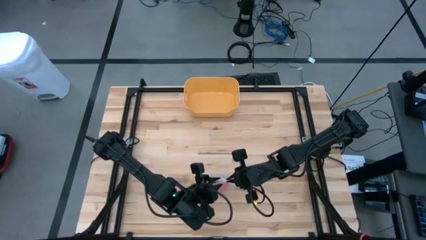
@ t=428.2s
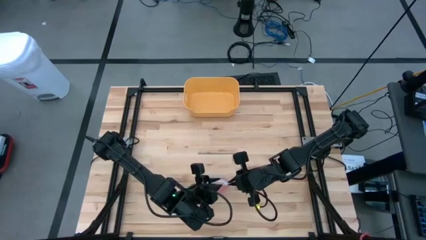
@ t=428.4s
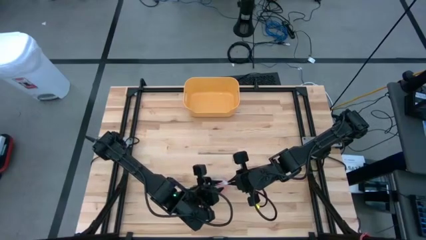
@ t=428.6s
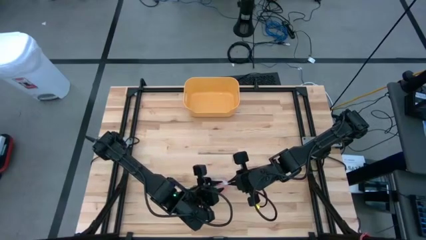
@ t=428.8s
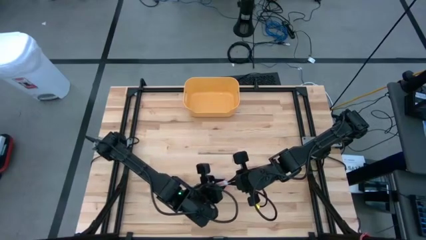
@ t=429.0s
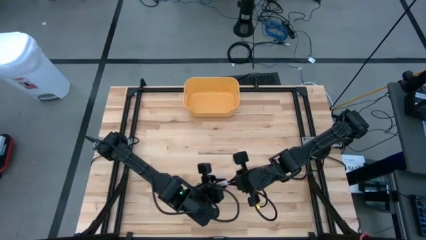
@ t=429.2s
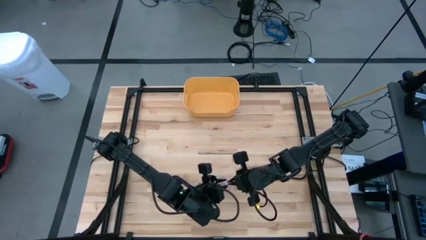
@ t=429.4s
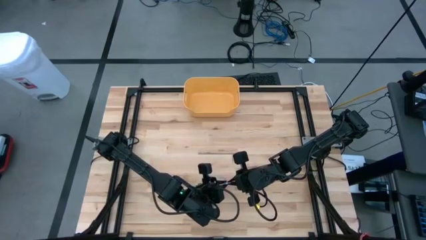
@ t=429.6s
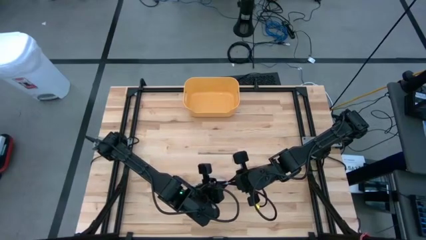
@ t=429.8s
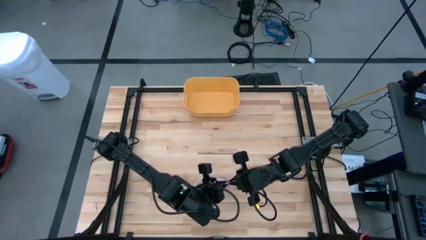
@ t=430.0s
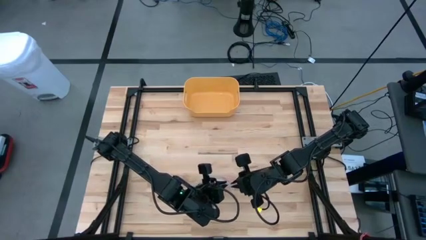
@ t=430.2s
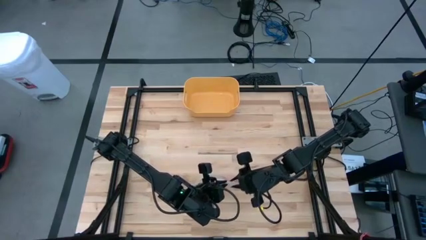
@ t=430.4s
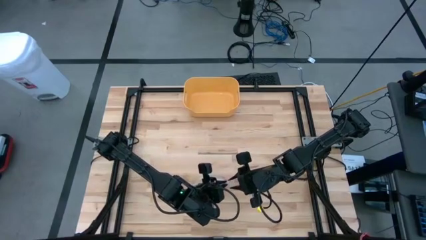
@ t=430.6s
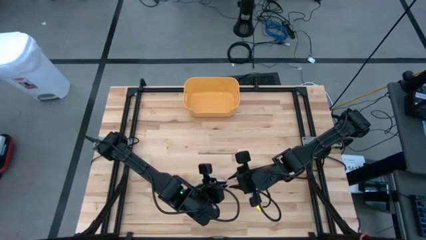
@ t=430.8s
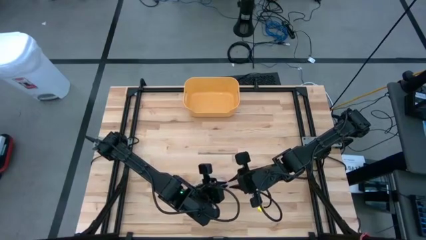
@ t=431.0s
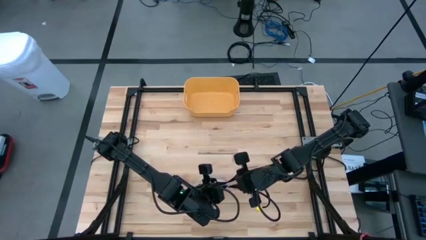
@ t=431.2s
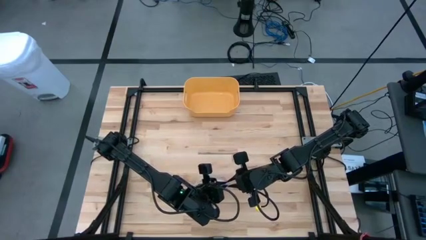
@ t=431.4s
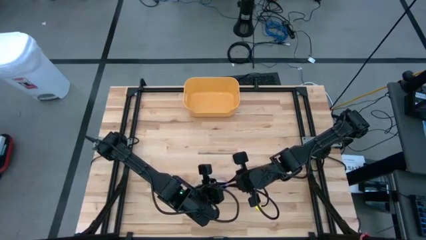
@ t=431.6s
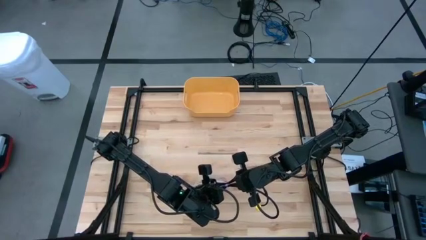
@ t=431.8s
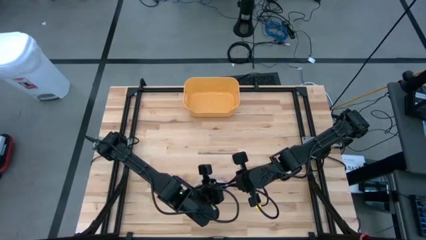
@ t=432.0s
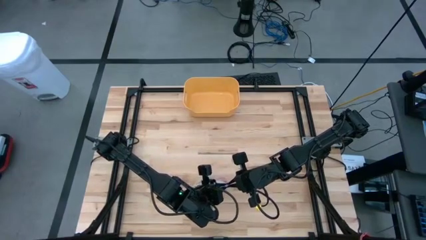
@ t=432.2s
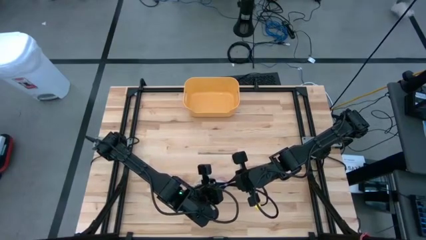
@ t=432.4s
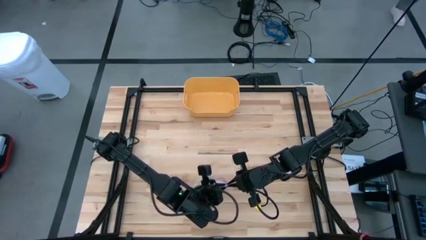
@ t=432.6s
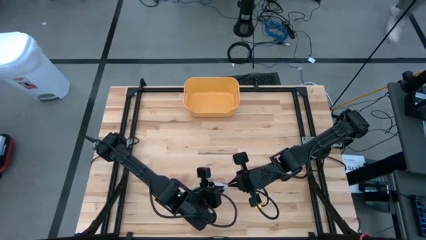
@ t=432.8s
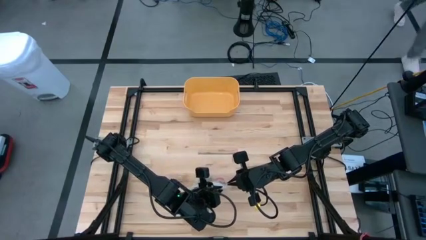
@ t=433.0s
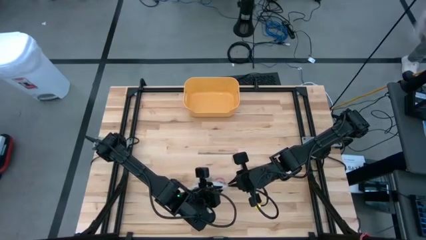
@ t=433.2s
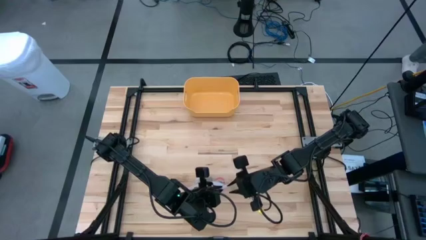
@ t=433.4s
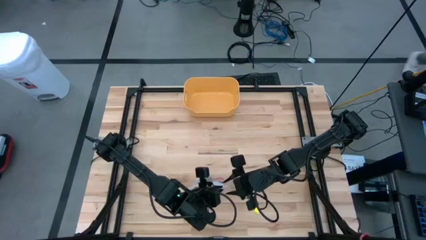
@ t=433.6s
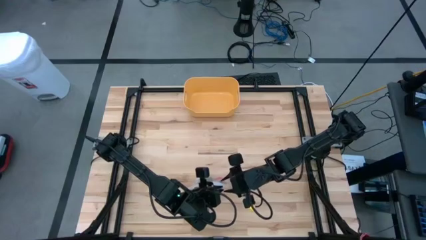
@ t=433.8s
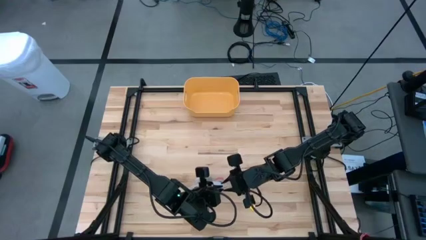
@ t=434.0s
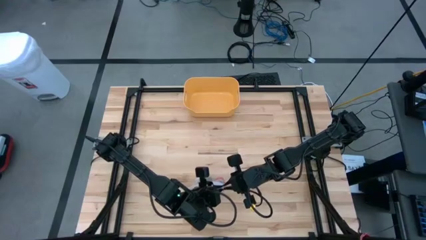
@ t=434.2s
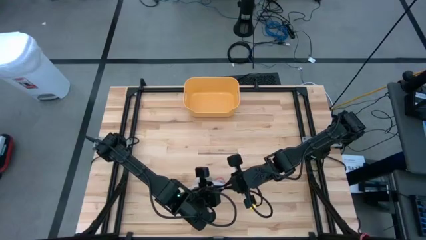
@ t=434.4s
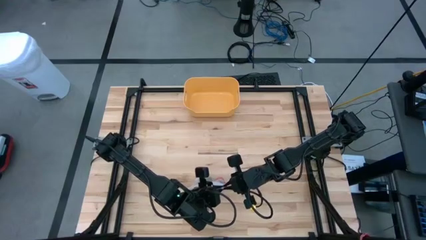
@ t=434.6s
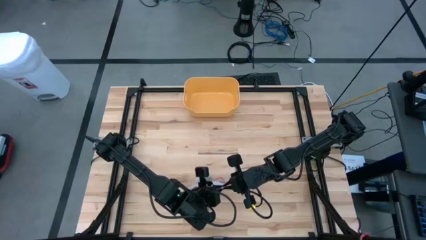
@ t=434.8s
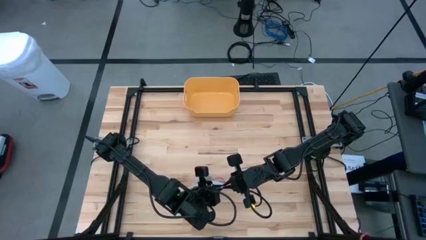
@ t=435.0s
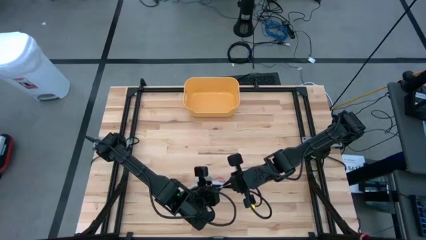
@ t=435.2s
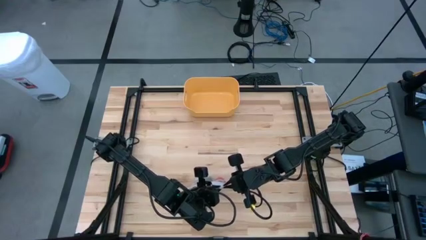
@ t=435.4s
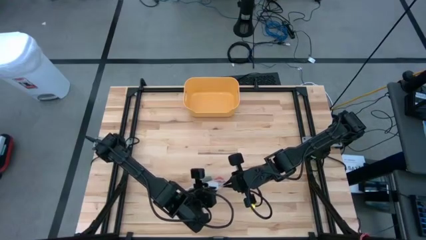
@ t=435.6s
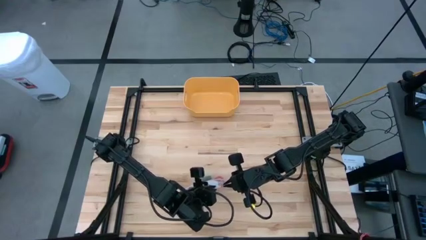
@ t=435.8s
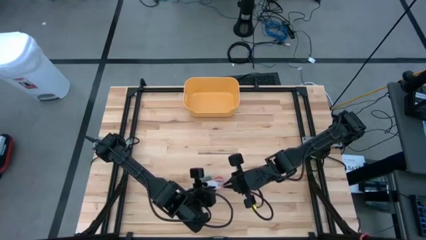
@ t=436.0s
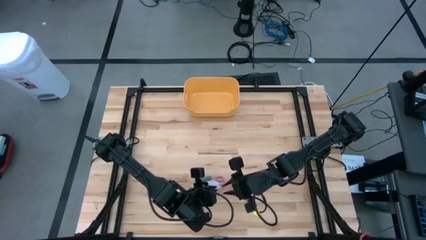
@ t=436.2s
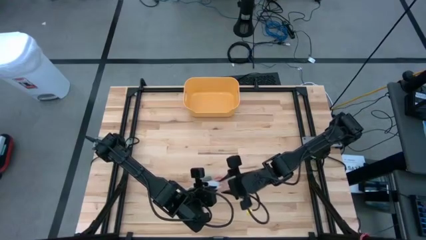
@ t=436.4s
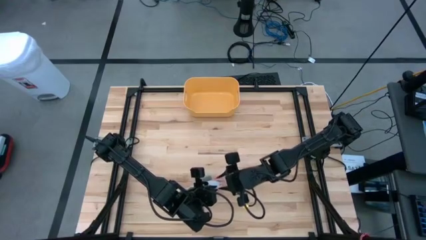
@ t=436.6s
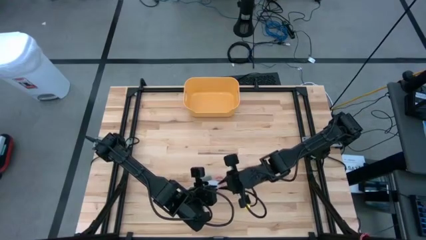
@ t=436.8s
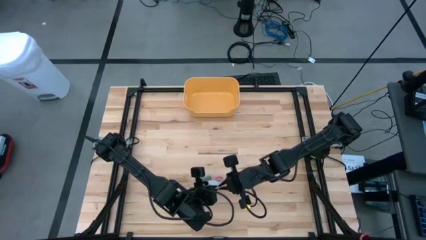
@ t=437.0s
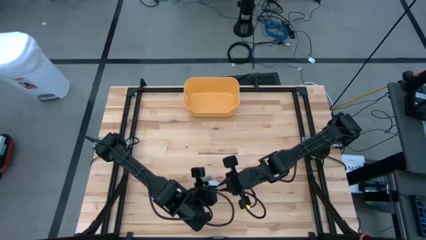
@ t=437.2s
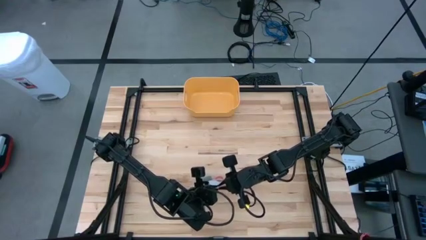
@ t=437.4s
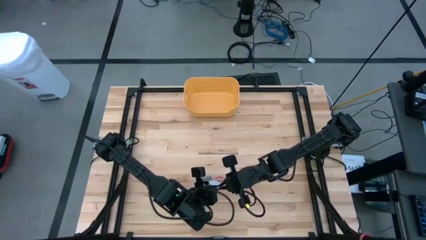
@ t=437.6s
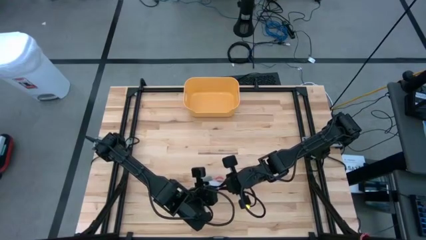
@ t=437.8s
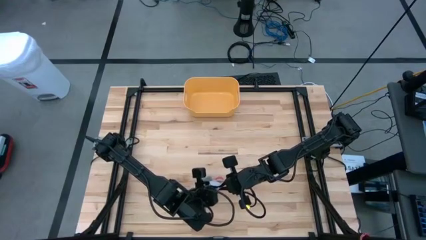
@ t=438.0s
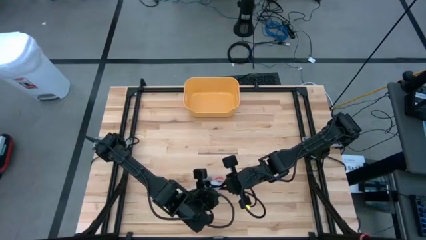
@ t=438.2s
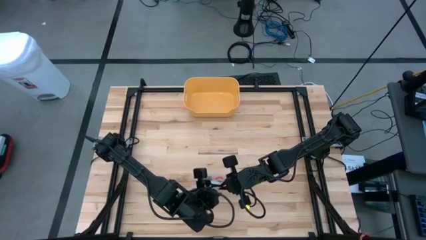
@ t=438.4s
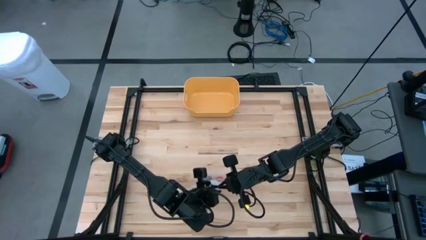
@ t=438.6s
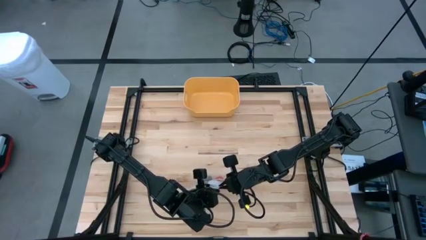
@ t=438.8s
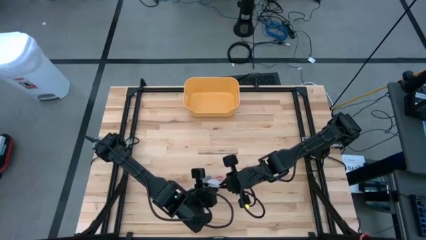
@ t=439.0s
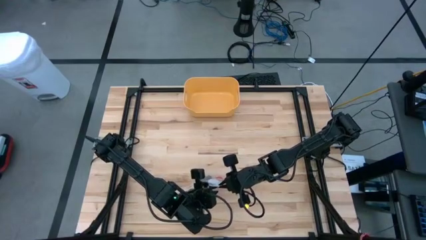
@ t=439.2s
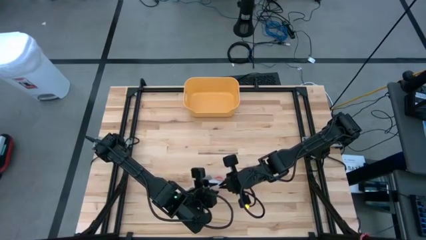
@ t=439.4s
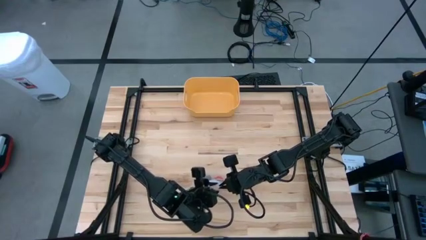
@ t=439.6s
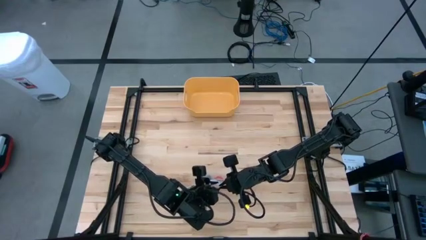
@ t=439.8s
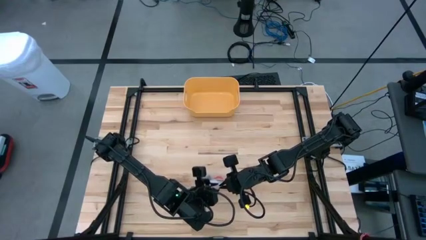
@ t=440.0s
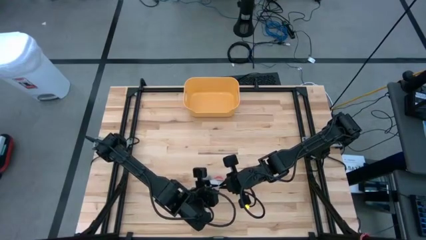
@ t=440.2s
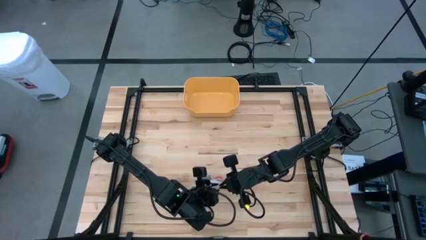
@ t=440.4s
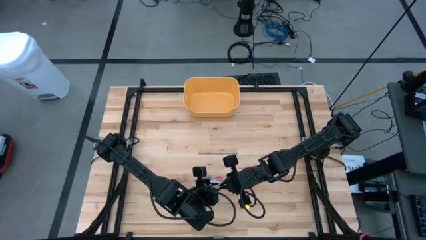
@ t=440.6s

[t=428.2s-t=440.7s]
Task: Roll bandage
Close the transparent zip bag

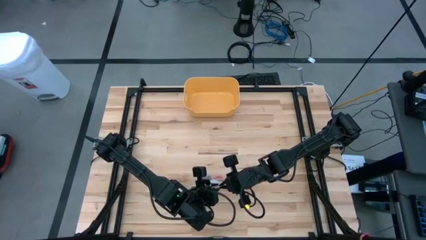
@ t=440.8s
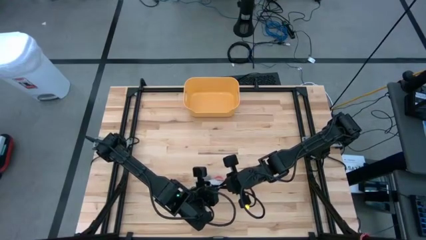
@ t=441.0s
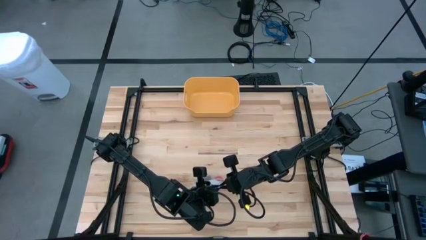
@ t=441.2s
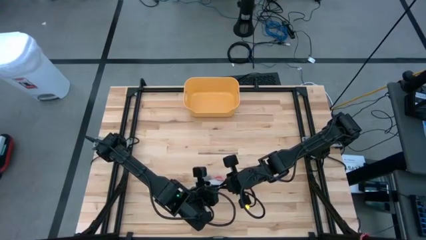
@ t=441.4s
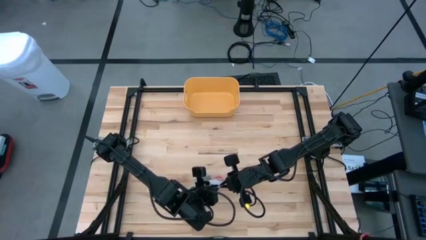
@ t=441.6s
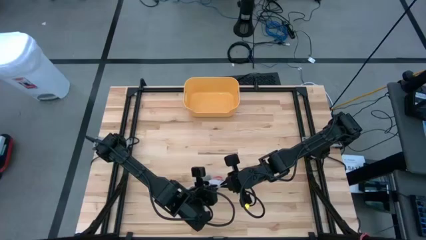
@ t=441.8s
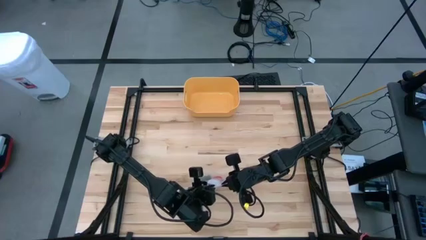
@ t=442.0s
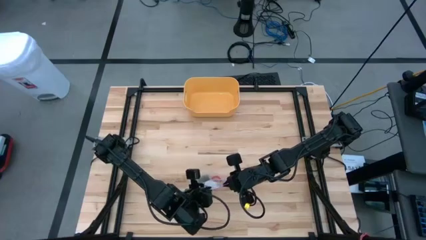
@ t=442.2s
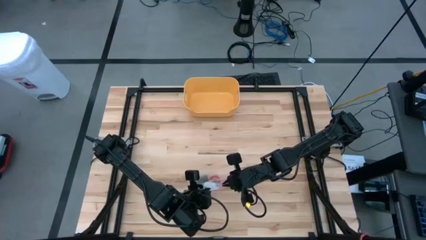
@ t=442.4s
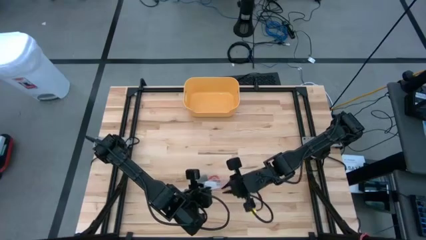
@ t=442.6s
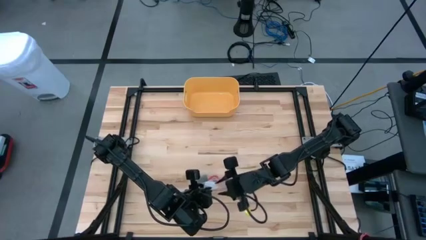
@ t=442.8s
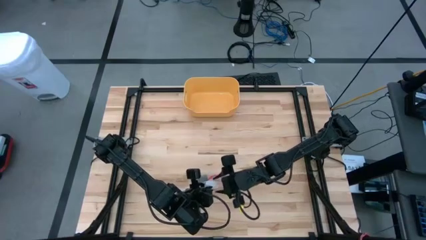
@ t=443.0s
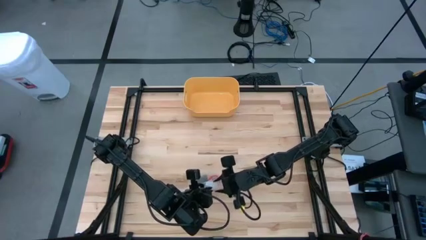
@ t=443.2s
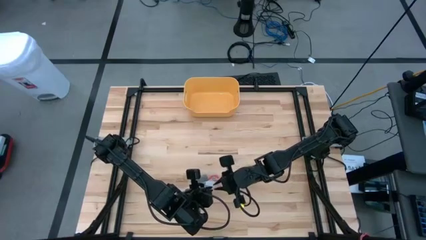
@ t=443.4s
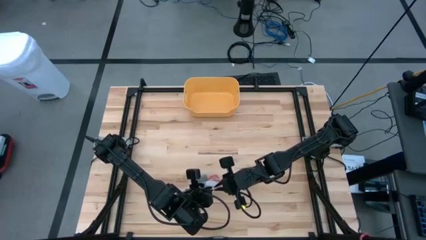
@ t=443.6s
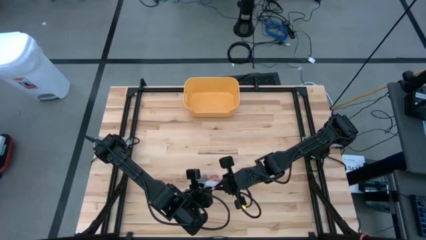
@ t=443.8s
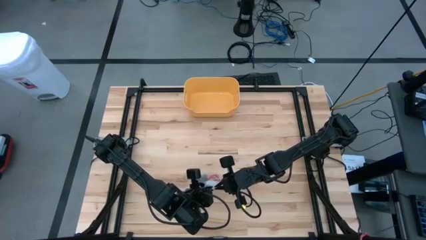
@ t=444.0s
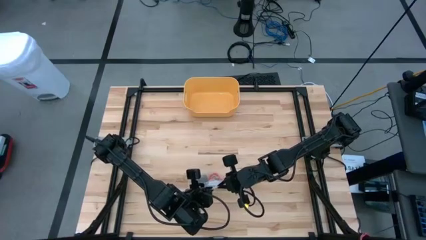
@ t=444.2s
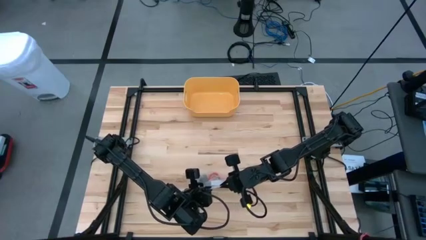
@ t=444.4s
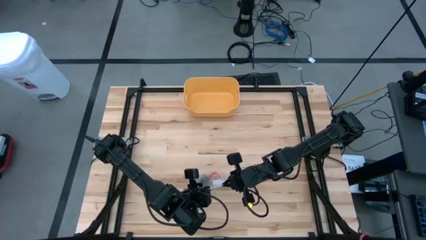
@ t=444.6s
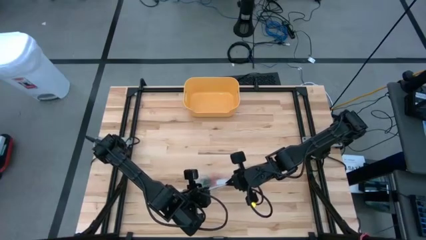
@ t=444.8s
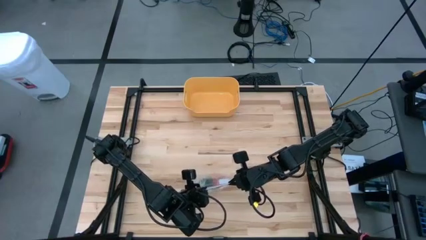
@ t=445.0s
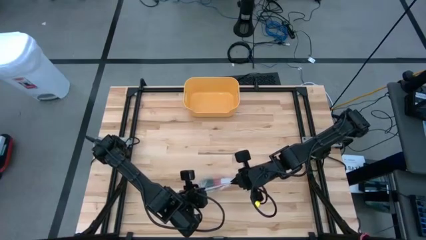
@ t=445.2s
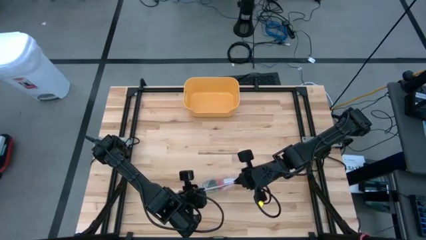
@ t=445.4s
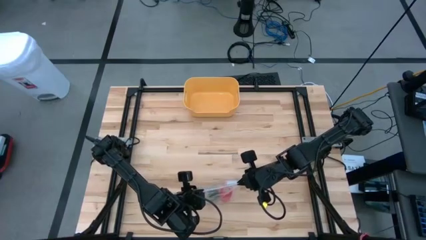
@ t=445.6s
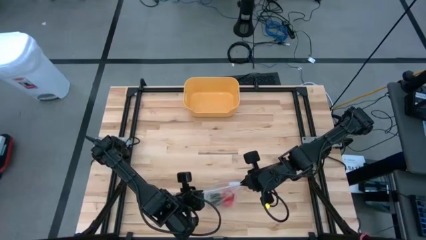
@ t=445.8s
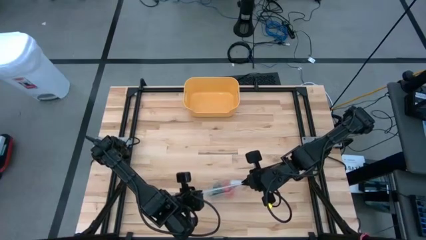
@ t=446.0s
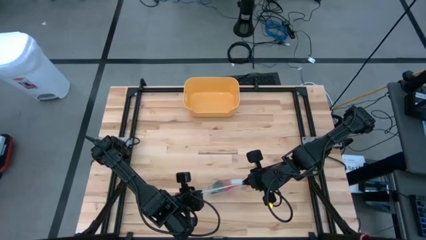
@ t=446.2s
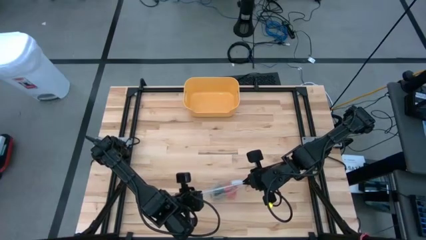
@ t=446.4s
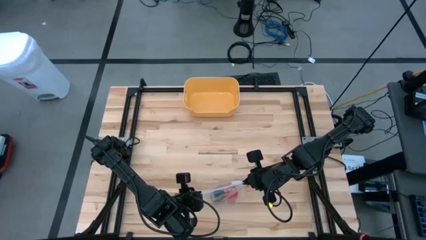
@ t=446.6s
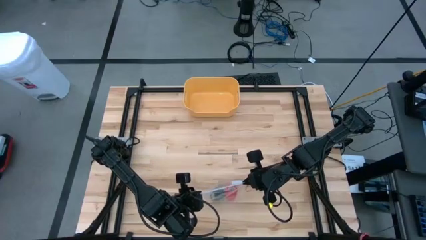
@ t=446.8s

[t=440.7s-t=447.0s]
Close the transparent zip bag
